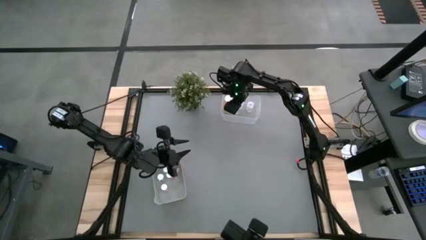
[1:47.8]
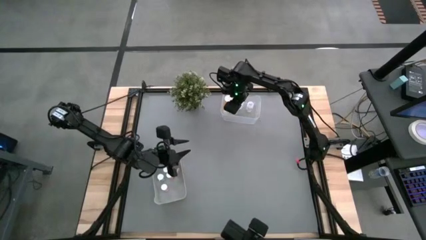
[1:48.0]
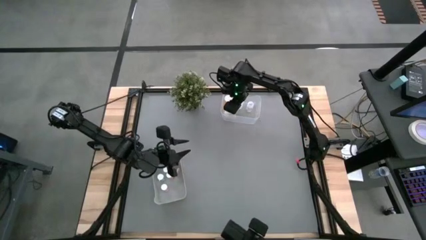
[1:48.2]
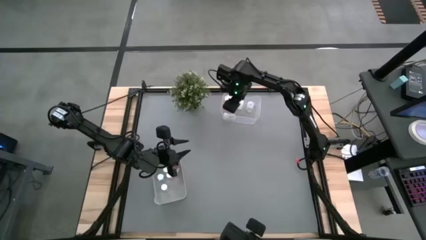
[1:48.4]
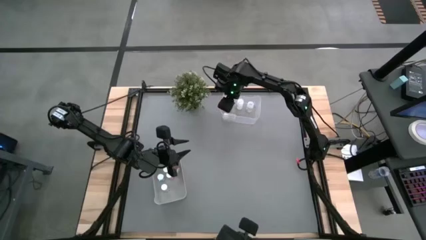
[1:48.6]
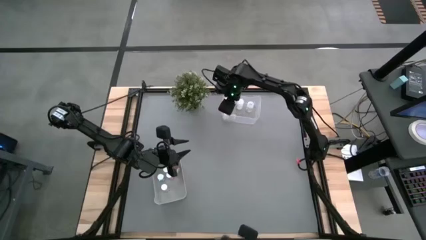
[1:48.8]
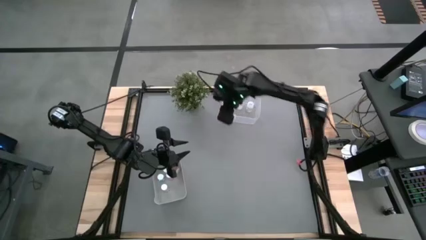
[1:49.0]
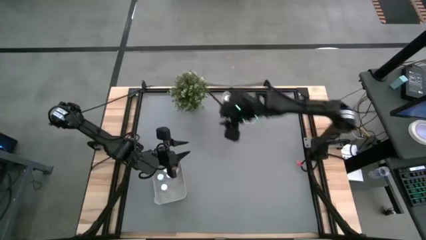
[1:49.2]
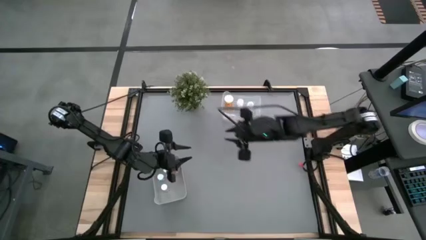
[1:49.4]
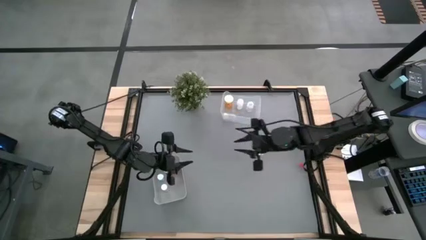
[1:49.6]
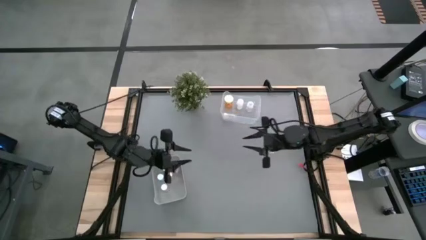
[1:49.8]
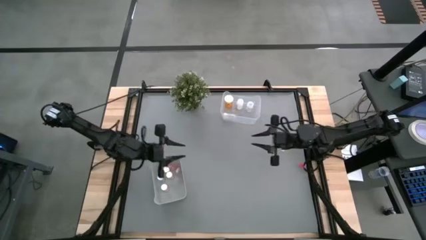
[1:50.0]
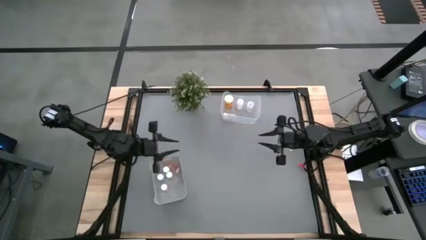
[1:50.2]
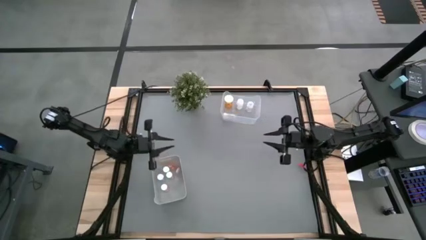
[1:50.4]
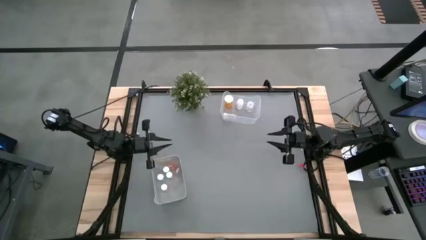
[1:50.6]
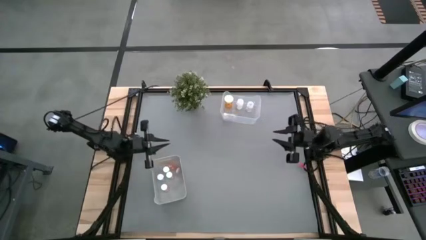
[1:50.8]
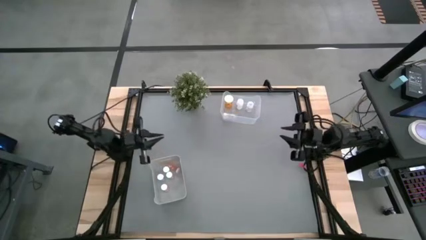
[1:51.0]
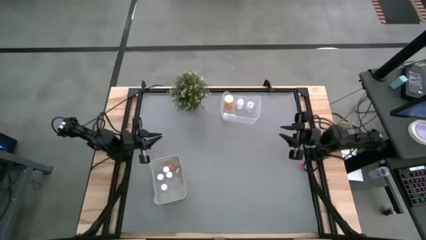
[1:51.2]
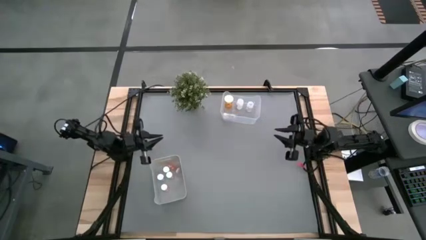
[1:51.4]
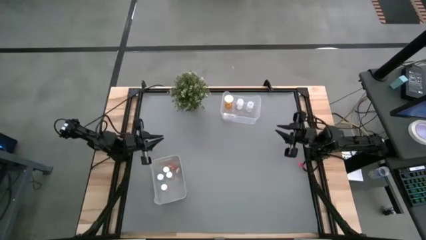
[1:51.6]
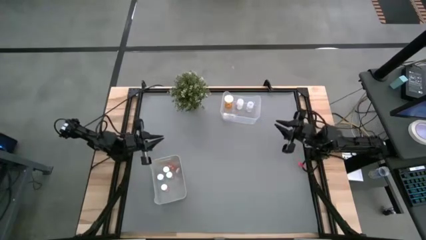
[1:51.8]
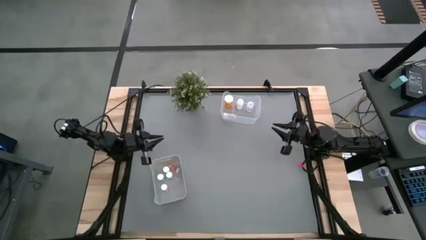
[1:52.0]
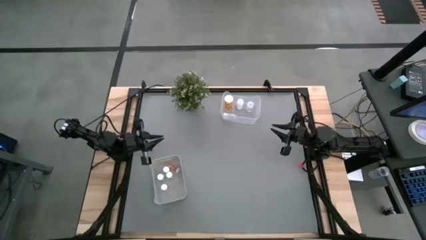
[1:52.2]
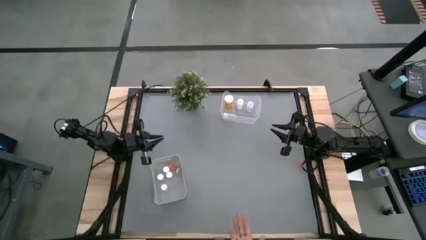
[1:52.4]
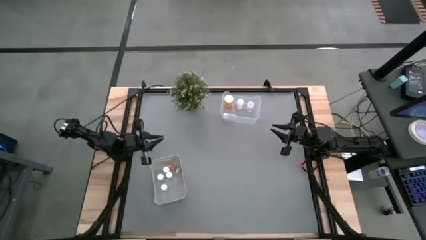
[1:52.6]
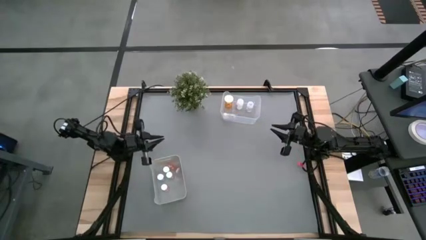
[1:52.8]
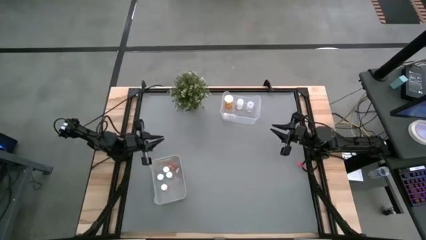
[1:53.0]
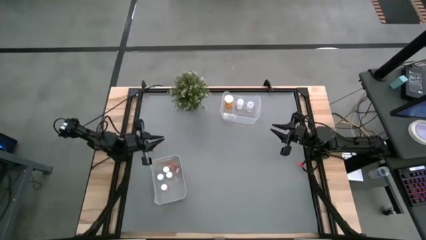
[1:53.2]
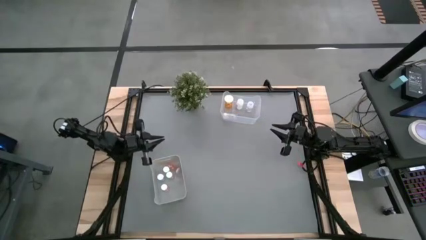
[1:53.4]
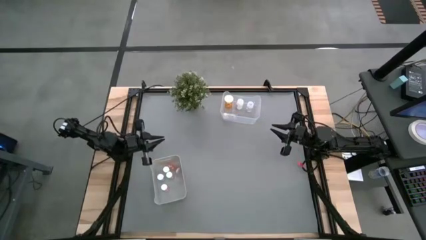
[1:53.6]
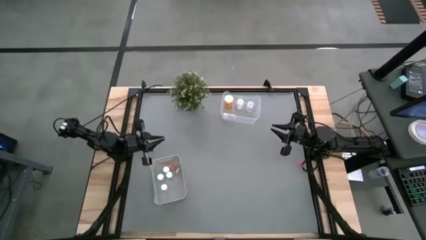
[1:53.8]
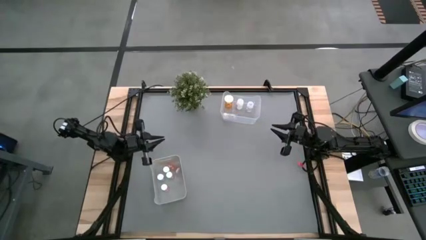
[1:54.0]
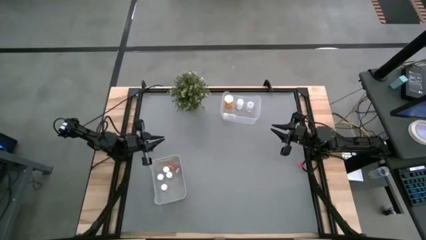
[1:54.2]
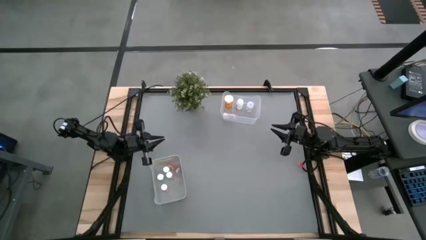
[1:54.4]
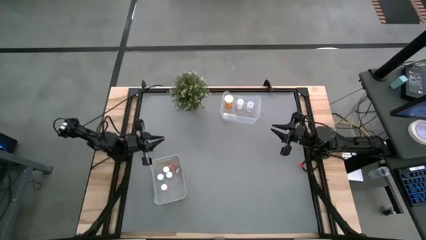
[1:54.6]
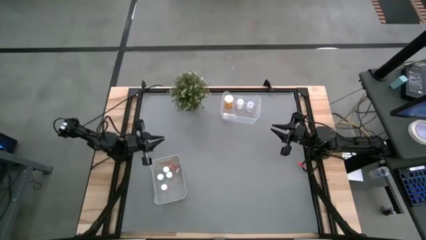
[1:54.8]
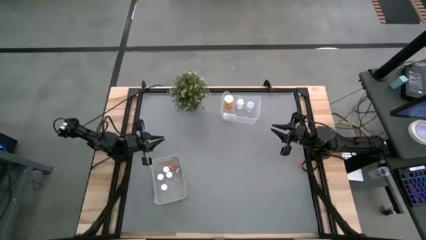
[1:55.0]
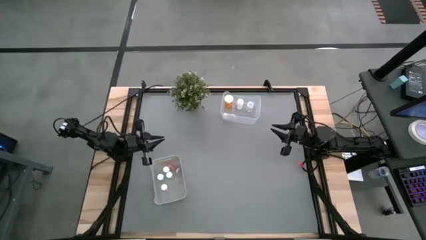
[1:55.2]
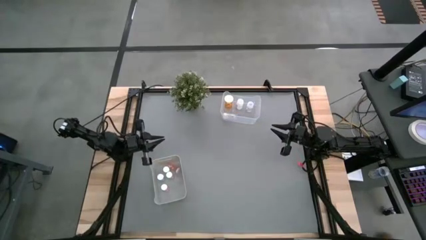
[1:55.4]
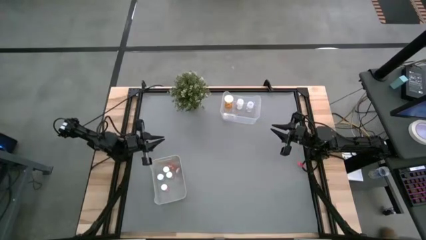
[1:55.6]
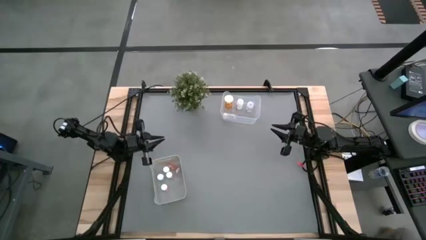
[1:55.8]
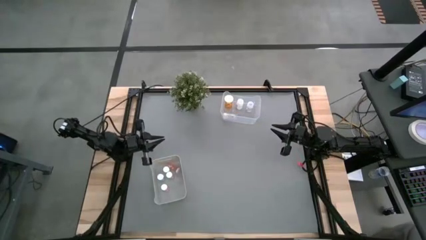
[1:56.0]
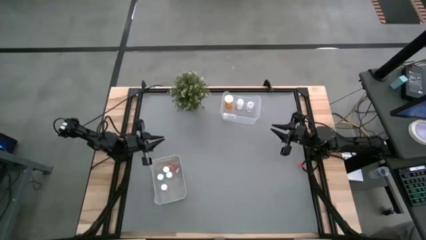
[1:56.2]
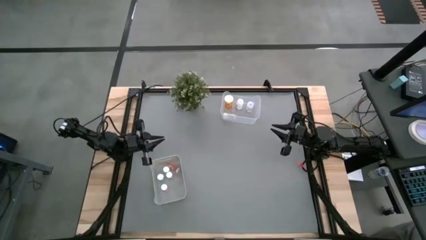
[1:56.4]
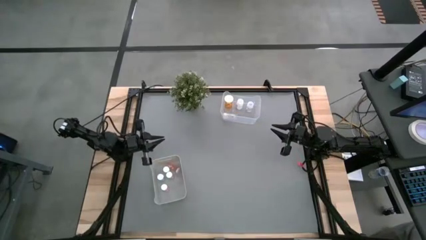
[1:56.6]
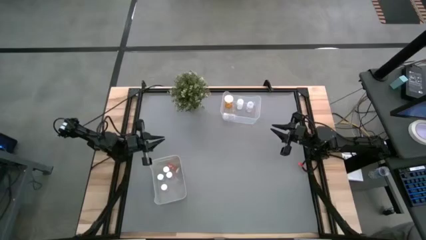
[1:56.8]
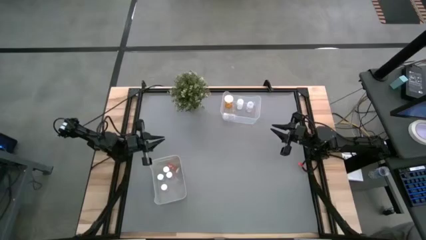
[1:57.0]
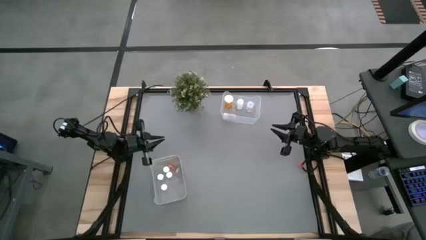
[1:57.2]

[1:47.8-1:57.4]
Task: Pick and place medicine bottles into bin by pill shape (circle, oval)
Return to Home Position
